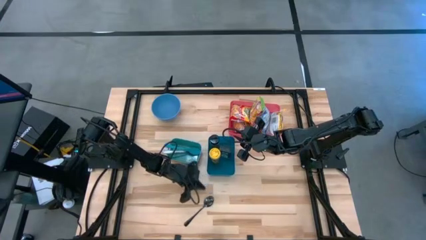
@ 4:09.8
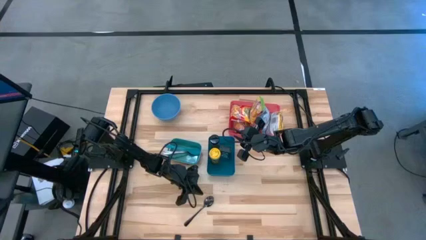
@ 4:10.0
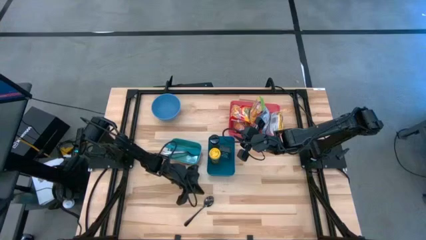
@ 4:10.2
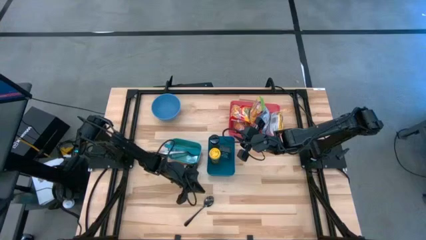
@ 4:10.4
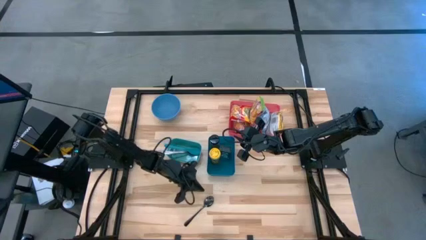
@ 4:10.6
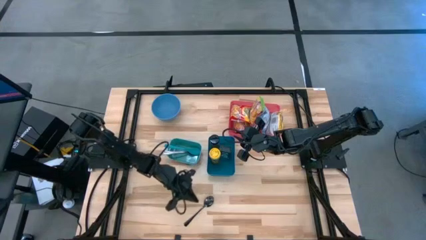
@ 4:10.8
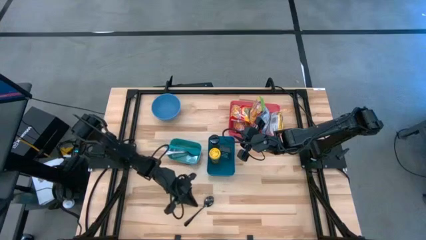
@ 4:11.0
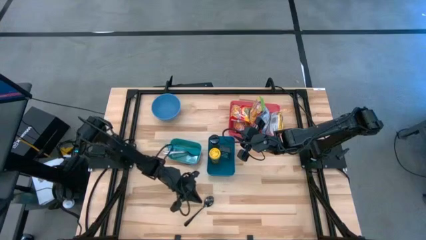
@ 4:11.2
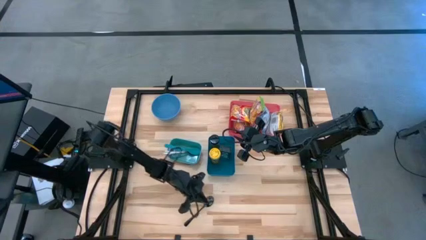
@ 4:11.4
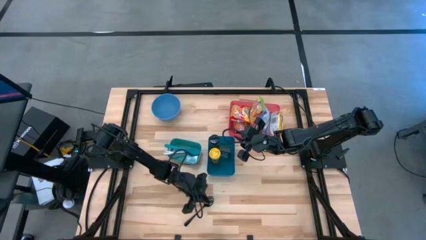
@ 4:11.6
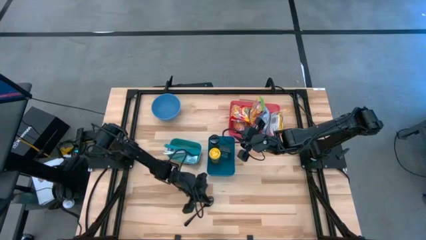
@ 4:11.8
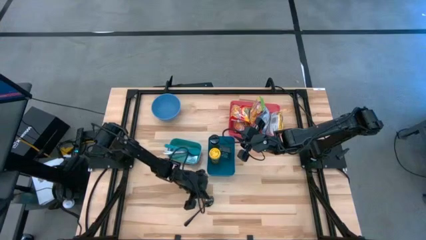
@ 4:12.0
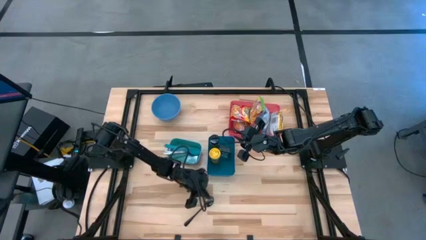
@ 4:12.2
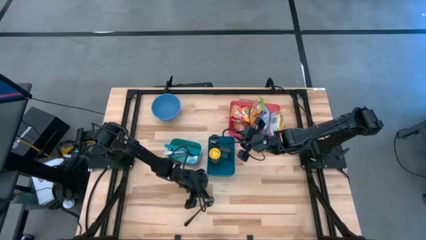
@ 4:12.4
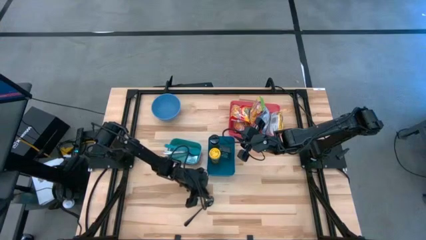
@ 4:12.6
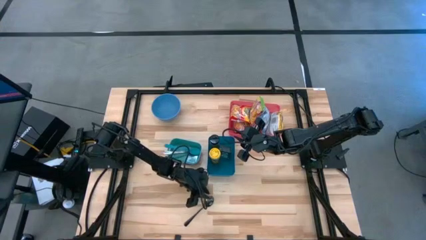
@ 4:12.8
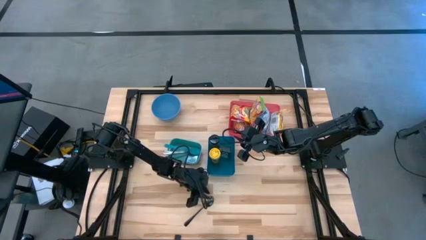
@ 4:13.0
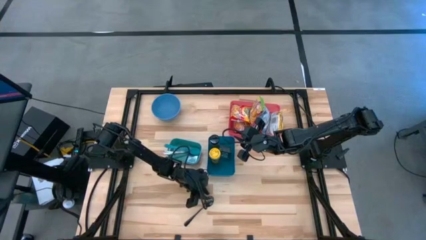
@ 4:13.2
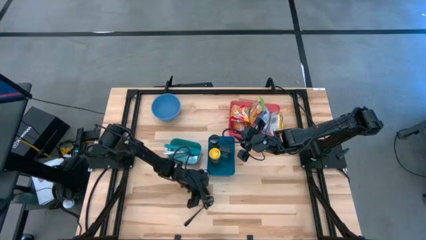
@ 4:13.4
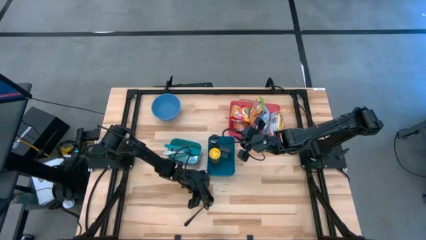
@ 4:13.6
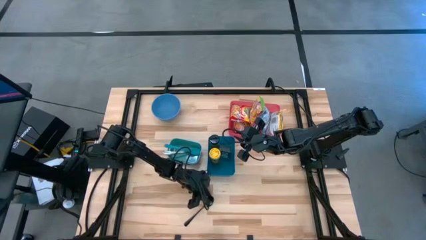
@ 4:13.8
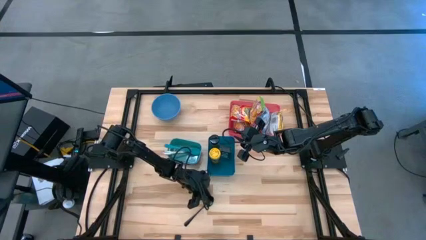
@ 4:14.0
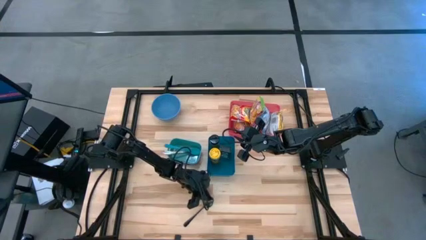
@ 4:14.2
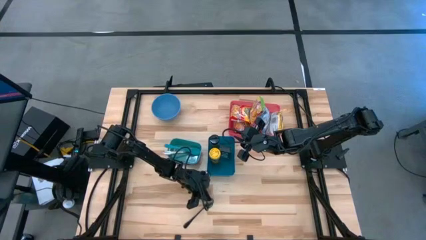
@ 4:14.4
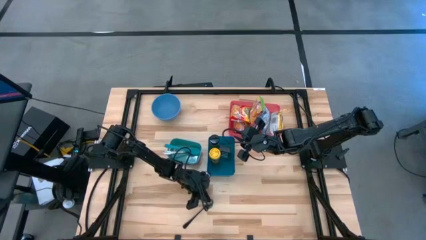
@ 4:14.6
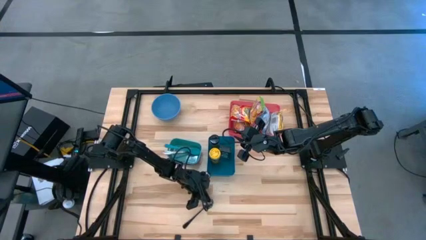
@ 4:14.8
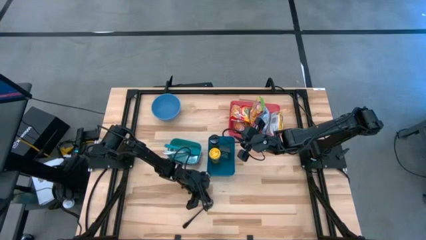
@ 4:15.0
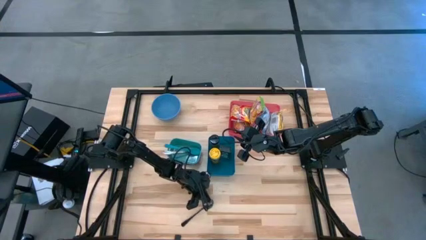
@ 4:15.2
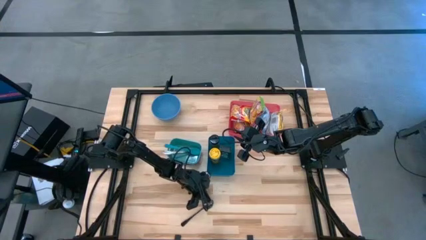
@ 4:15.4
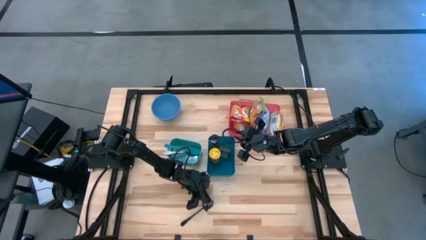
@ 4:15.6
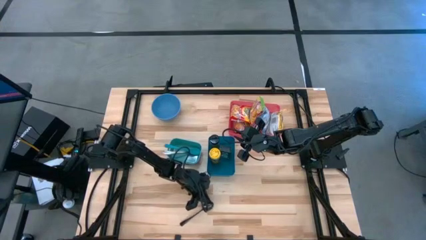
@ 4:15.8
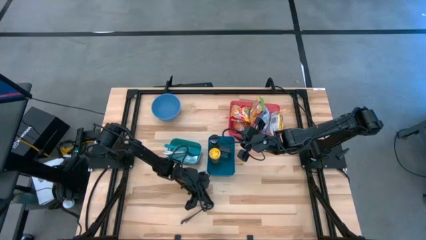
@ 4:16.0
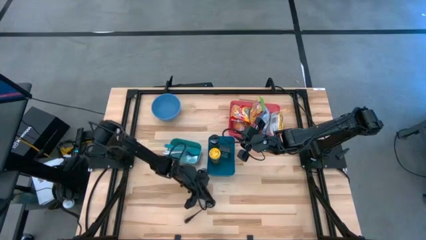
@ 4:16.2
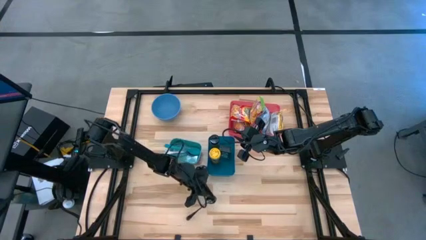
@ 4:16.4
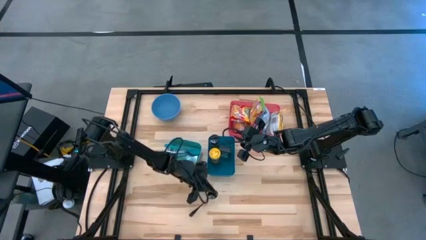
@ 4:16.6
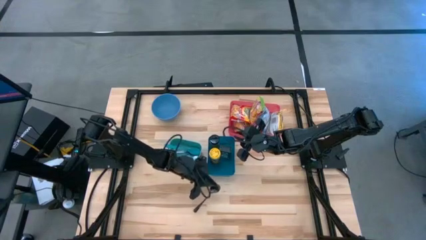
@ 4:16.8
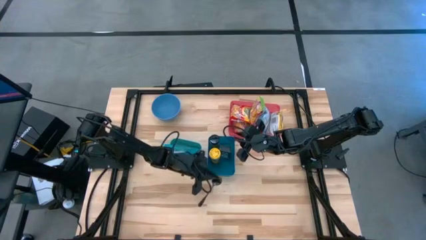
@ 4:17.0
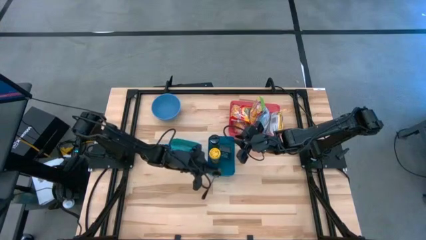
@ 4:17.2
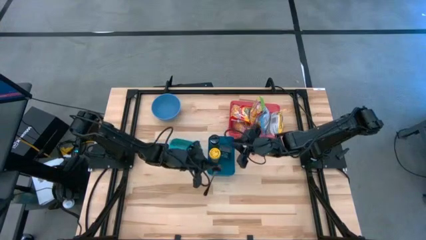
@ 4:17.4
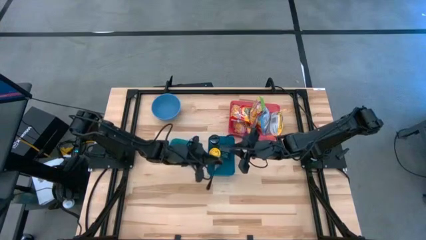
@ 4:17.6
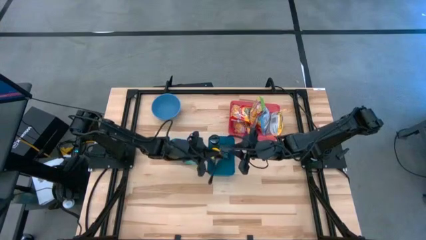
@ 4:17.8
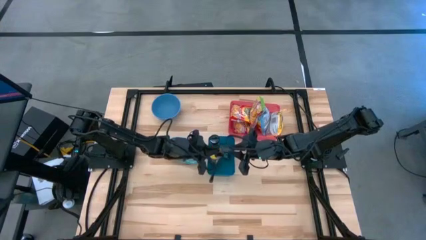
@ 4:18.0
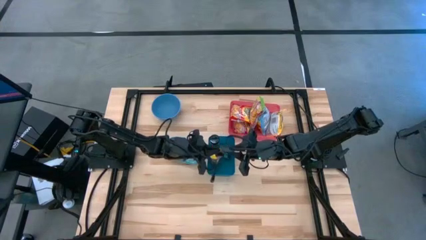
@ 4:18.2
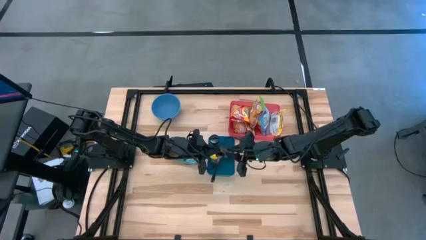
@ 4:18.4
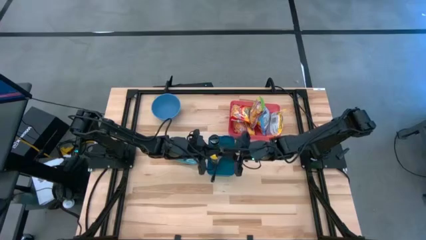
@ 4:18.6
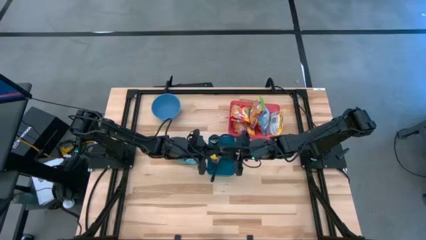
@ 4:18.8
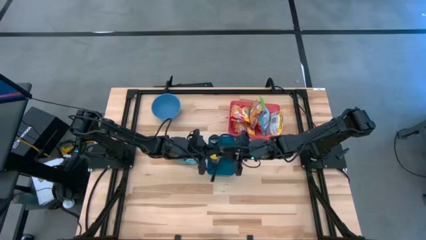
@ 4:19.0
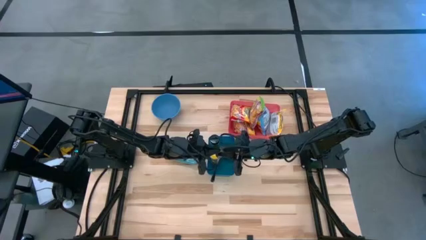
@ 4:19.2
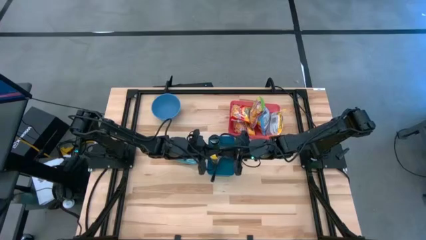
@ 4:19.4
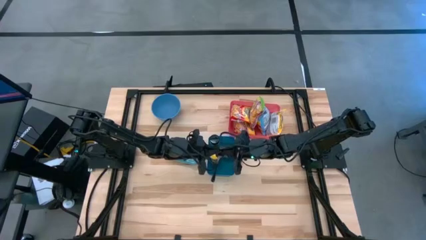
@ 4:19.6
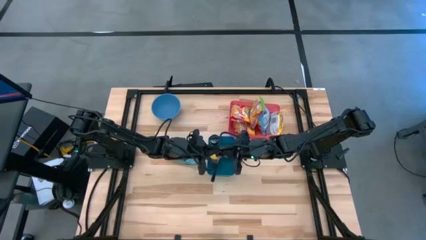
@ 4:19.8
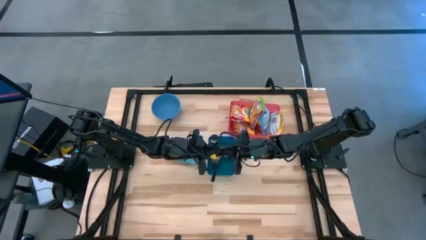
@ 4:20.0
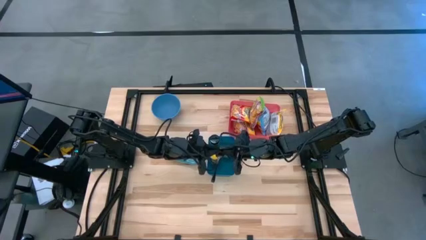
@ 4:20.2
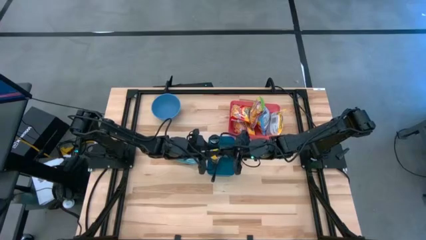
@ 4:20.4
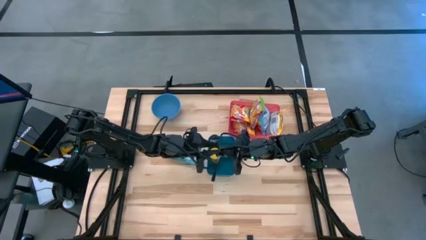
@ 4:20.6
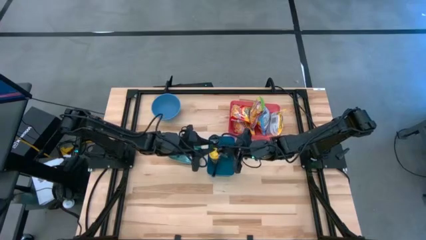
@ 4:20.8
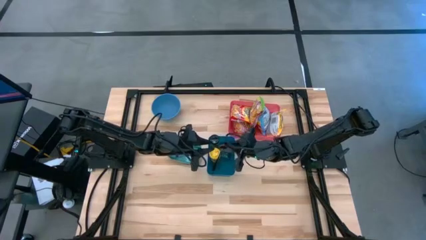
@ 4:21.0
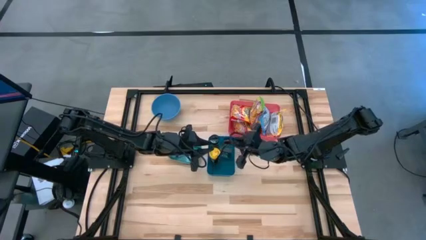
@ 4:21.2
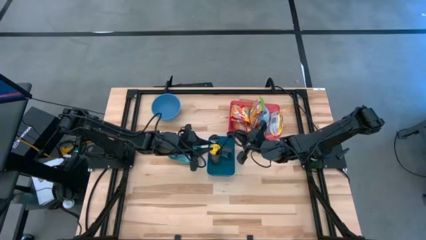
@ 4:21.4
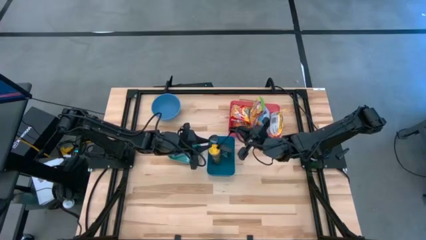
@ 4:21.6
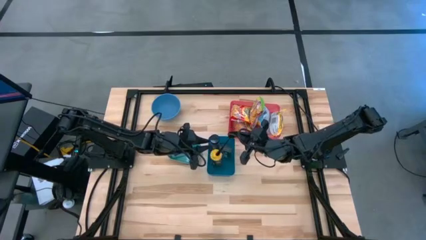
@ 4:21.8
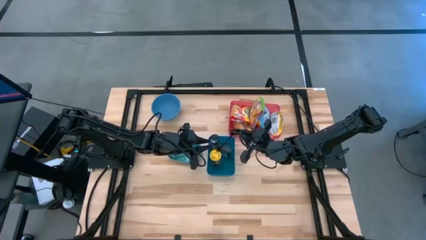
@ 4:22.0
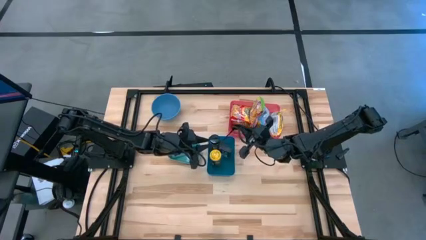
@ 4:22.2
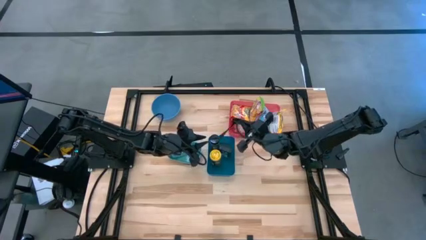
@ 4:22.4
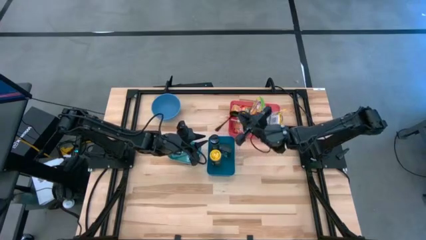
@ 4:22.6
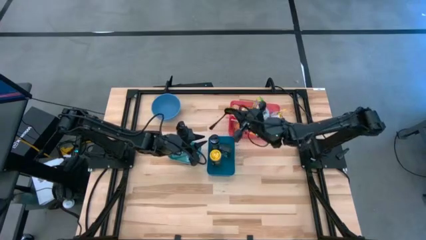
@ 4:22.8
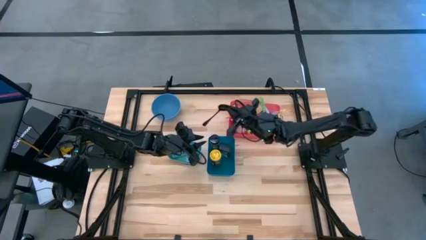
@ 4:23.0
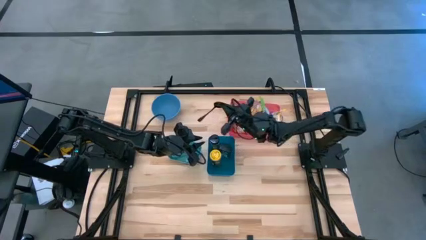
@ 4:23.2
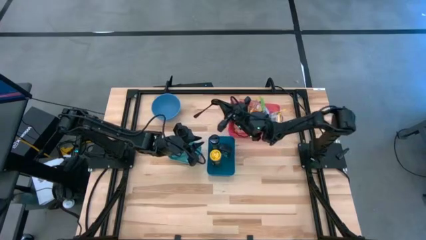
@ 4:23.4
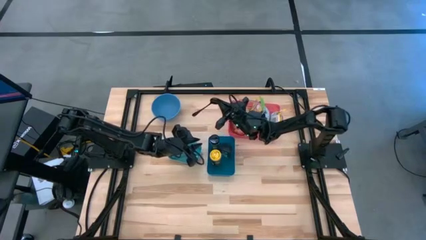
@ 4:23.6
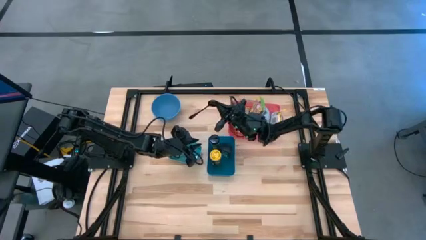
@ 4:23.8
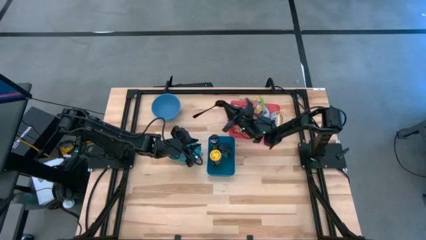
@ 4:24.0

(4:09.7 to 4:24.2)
Task: Pick & Place Food Item
Put the black spoon into the green bin

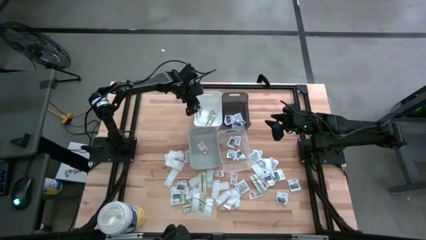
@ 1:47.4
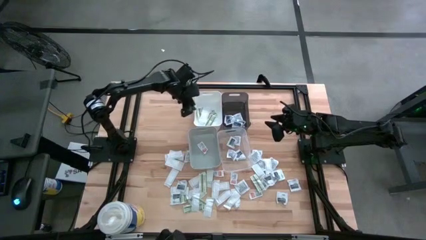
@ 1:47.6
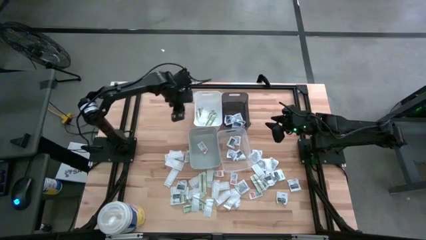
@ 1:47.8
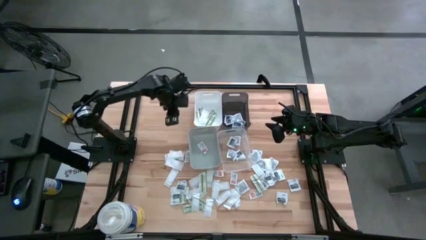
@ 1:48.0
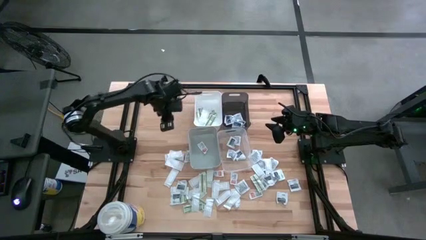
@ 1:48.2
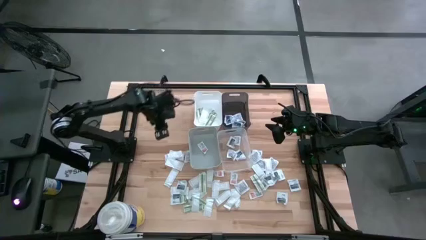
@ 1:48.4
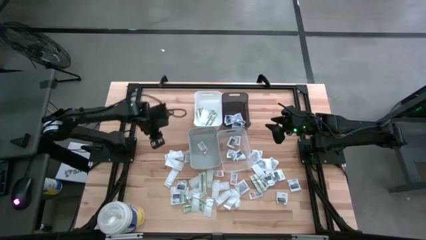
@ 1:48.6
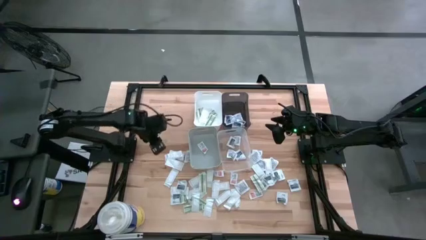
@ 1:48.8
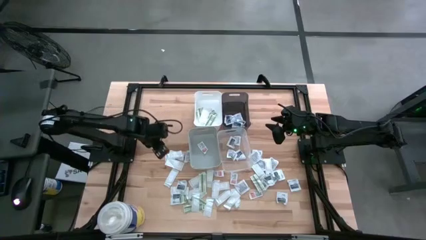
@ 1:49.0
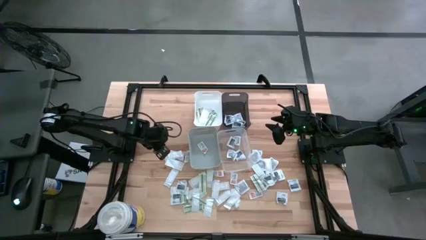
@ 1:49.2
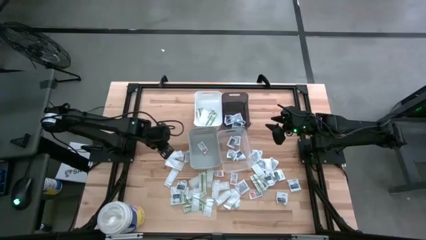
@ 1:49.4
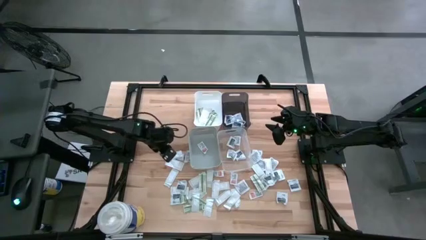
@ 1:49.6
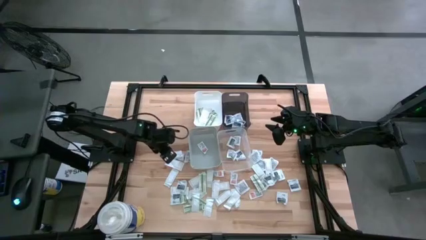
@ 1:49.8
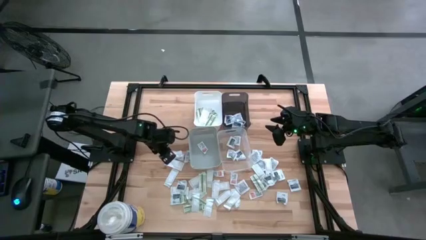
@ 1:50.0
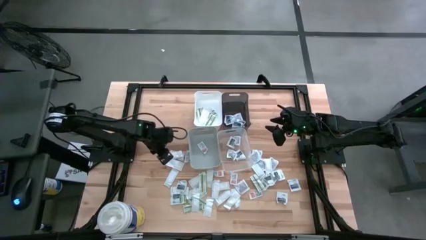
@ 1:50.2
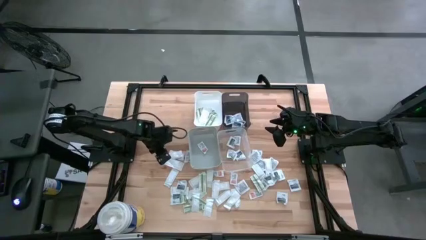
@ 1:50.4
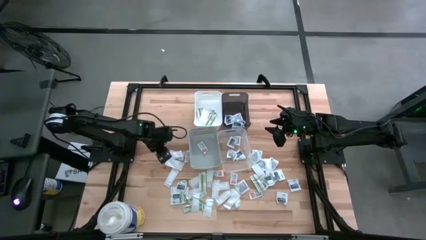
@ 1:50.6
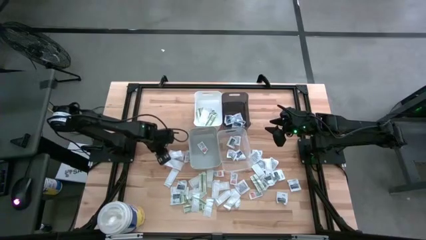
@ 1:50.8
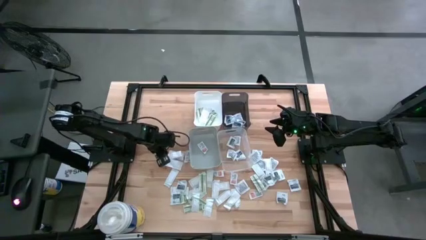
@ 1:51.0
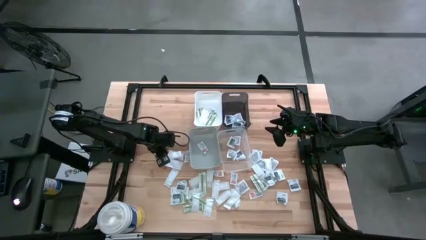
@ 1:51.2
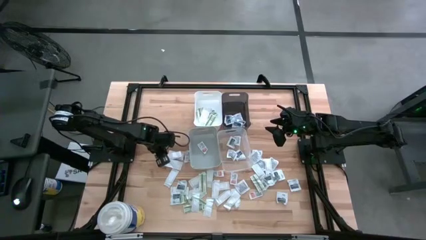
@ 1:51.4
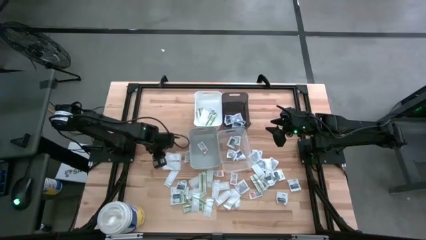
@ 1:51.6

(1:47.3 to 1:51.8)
Task: Pick & Place First Aid Supplies
Put the green bandage pack into the white bin
